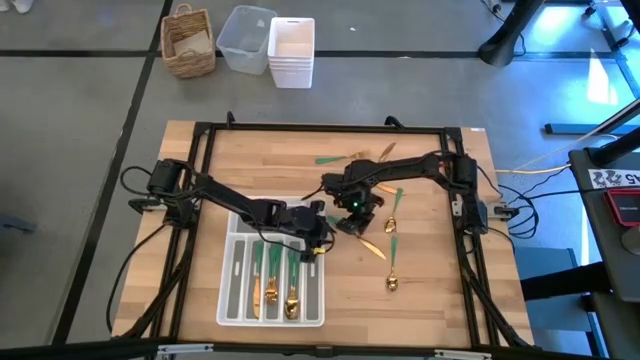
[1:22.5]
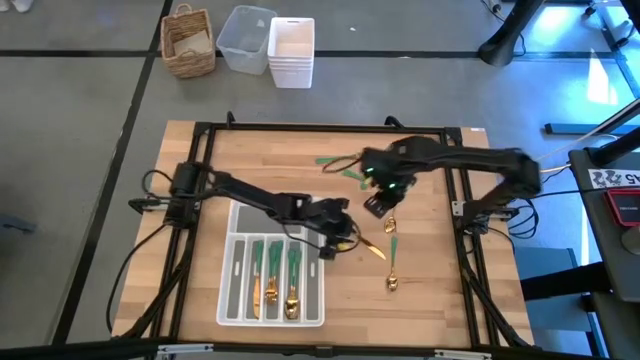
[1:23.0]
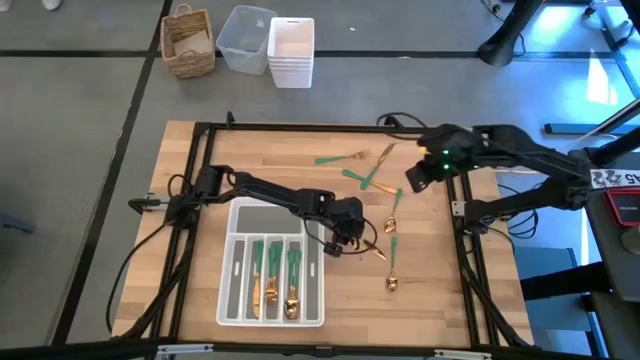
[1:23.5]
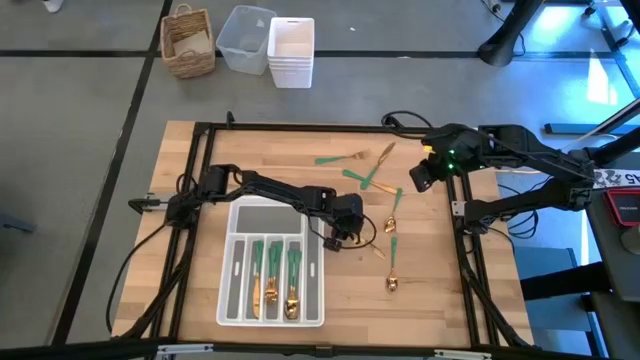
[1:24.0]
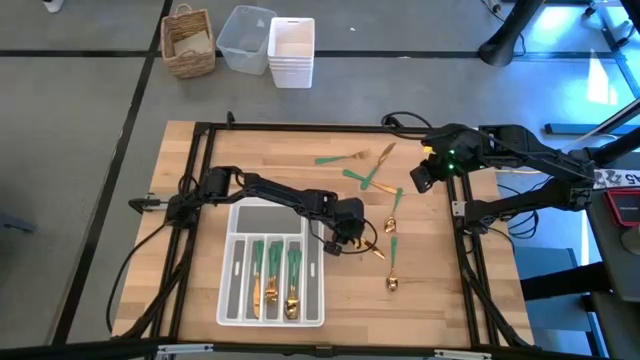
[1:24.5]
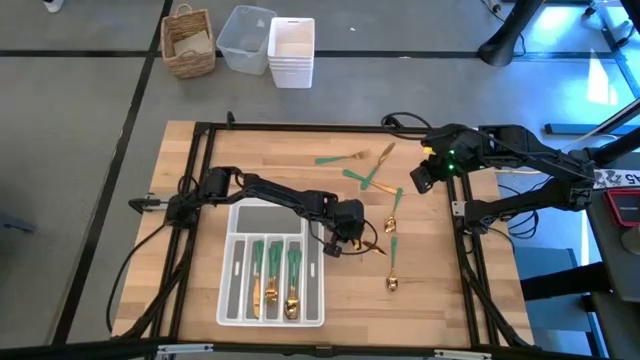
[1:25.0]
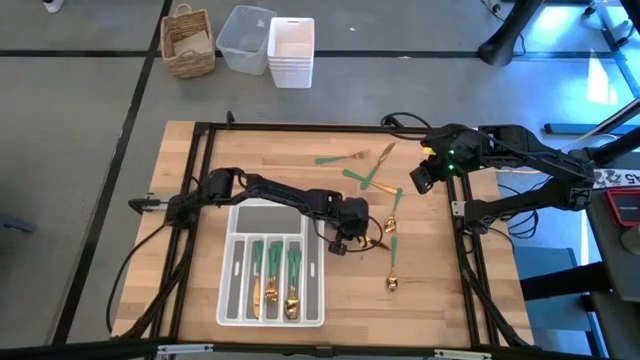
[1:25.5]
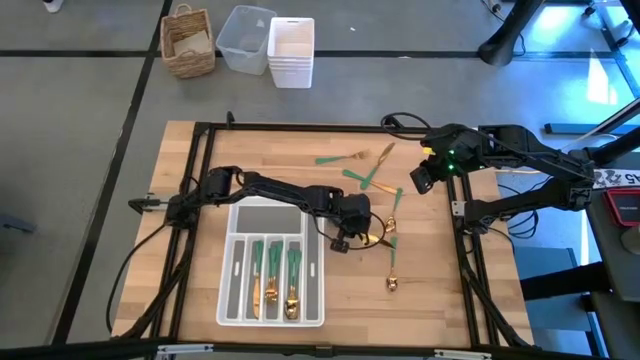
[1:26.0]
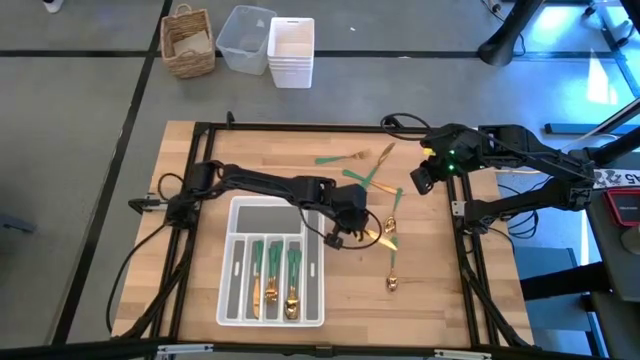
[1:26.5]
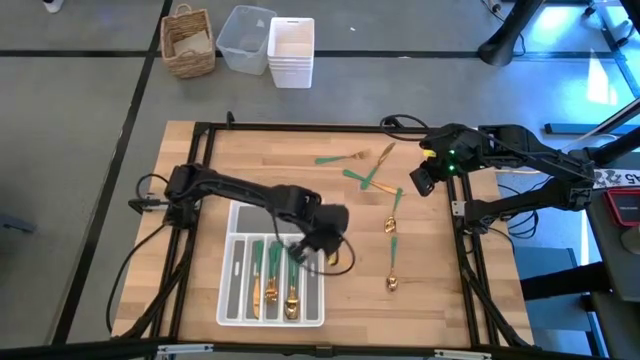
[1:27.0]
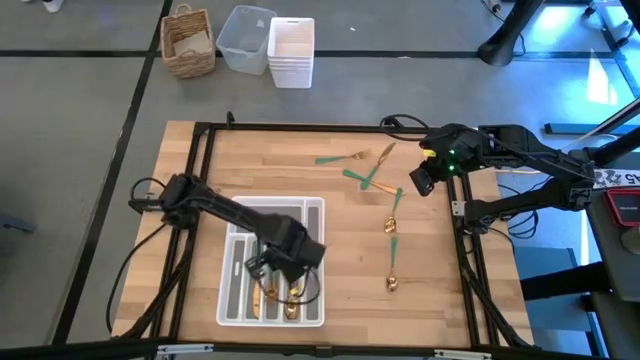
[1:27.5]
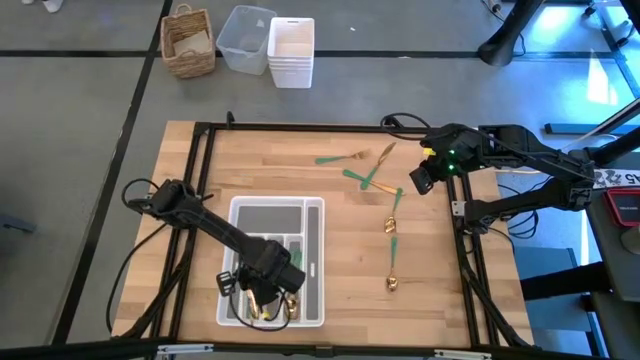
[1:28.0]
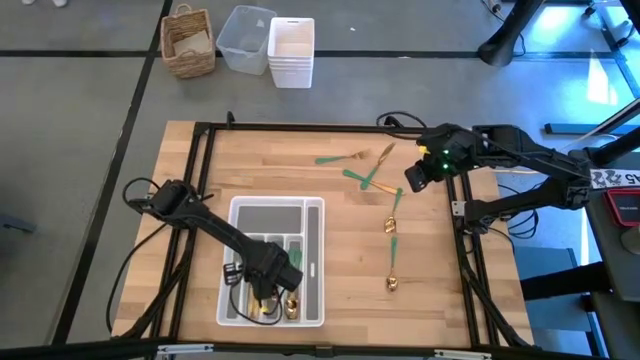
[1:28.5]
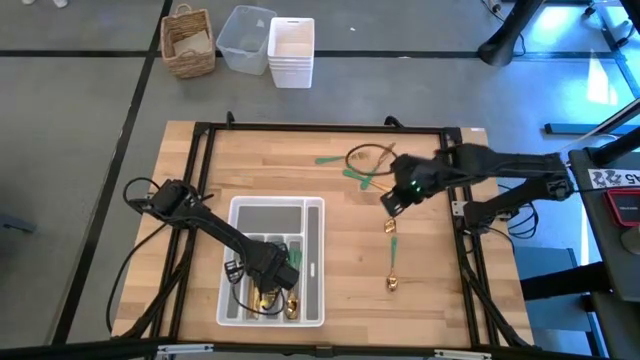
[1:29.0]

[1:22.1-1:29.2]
Task: Sort silverware
Put the table knife in the silverware tray

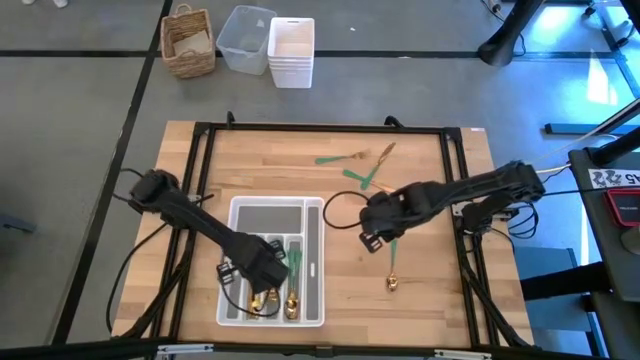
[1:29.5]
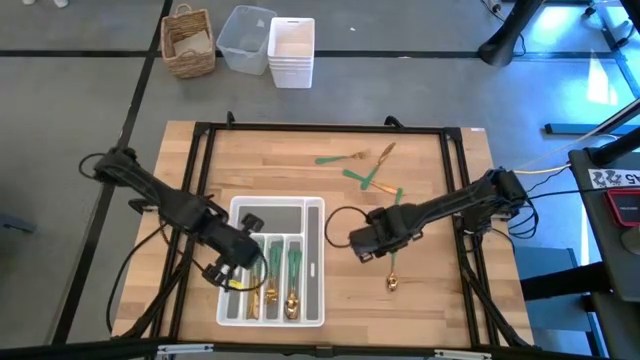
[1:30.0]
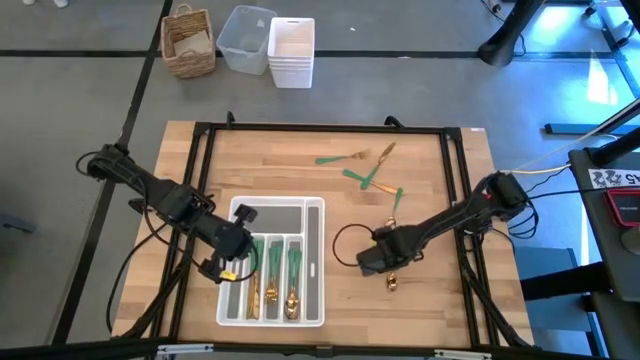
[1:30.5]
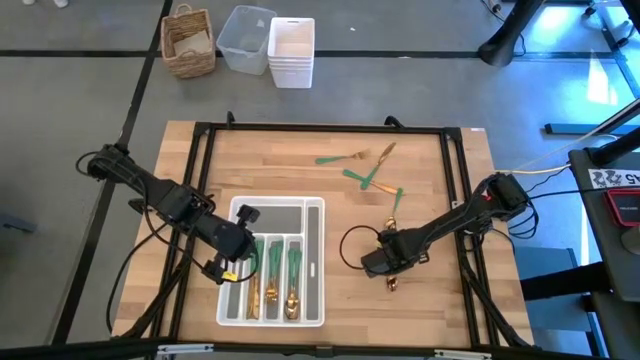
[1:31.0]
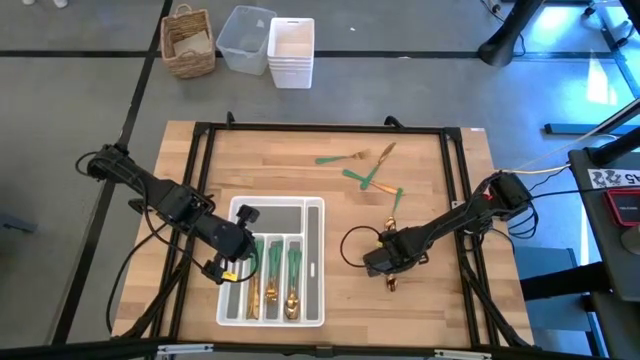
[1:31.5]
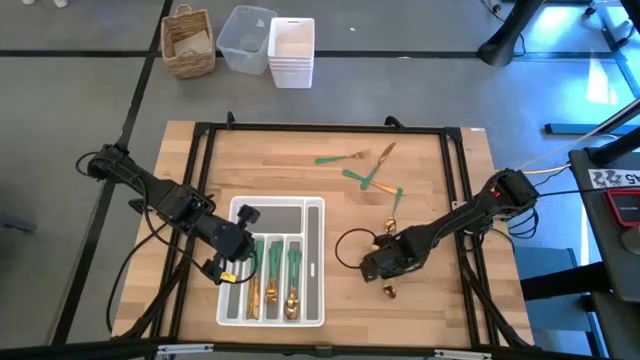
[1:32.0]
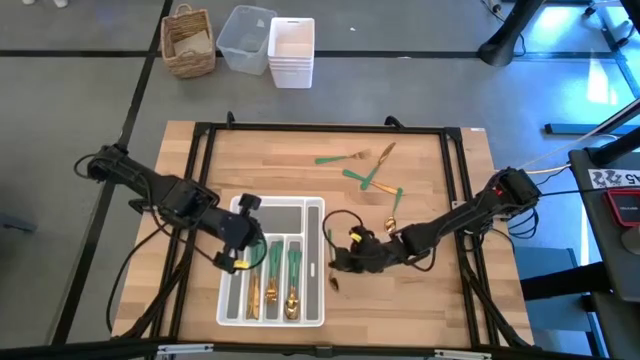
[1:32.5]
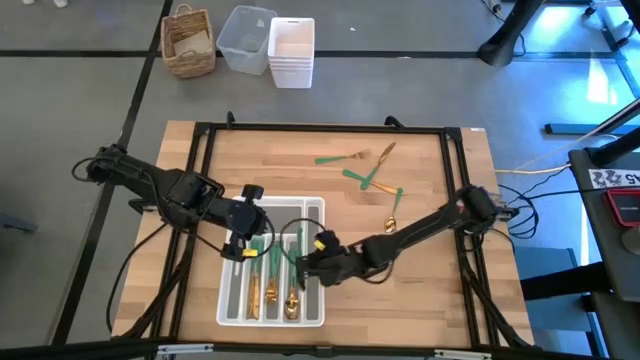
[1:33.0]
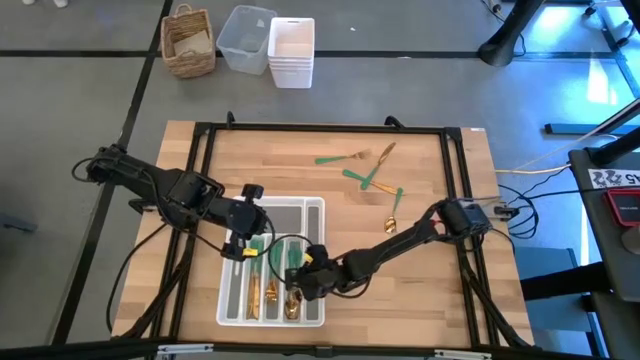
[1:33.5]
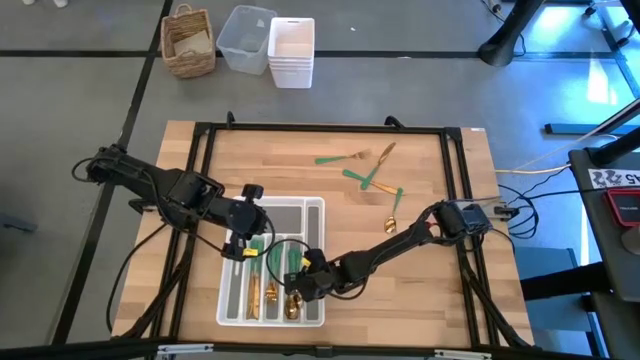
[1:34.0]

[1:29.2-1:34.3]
Put the spoon in the silverware tray

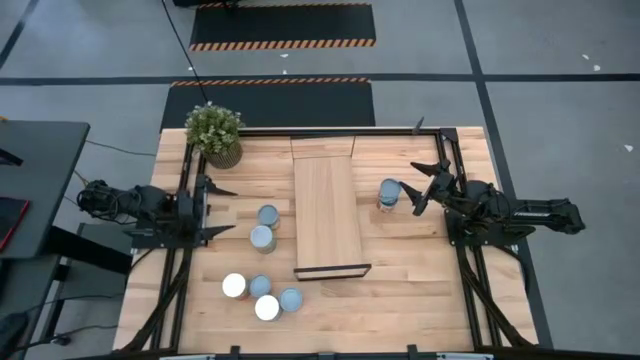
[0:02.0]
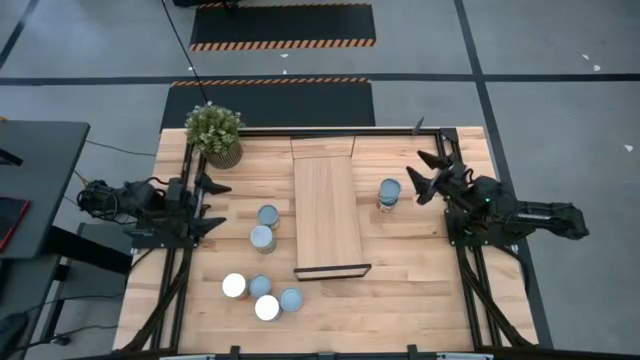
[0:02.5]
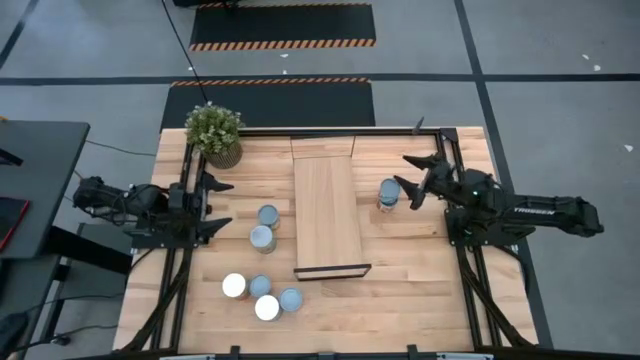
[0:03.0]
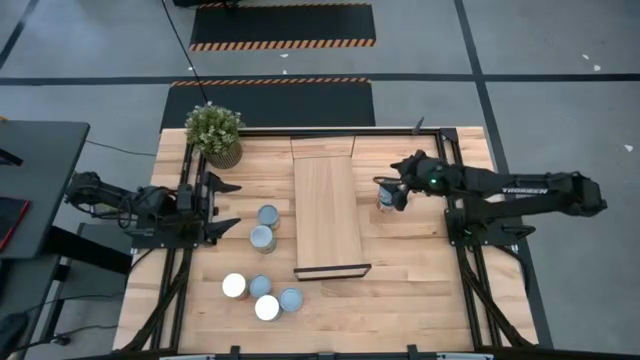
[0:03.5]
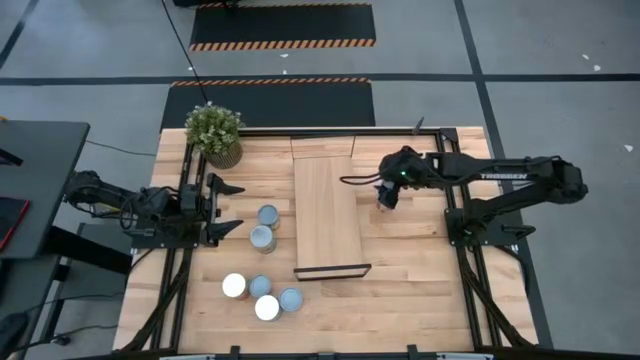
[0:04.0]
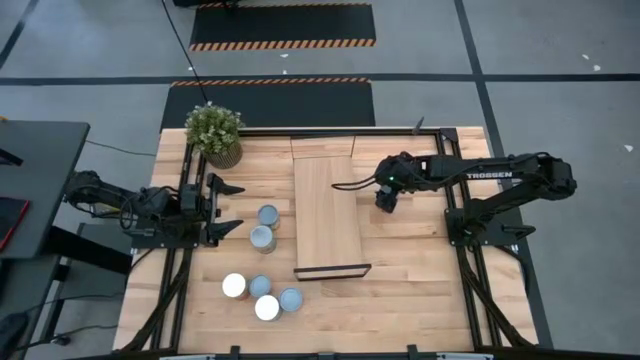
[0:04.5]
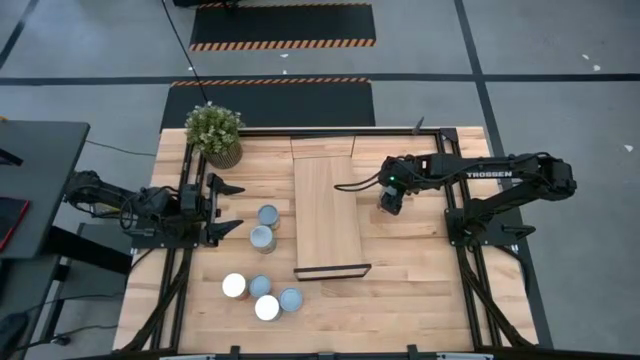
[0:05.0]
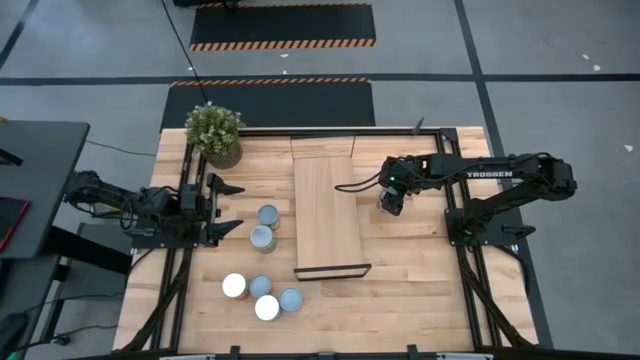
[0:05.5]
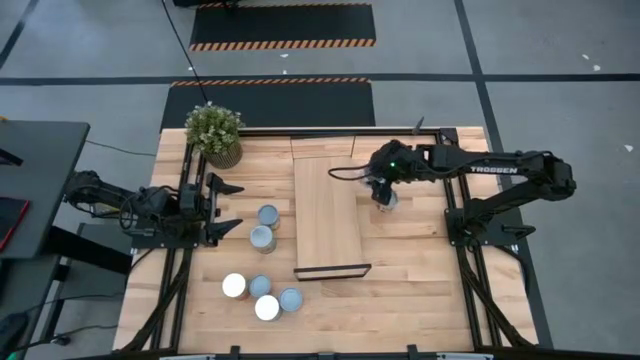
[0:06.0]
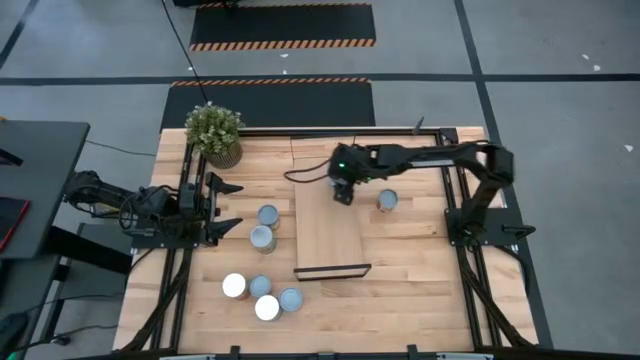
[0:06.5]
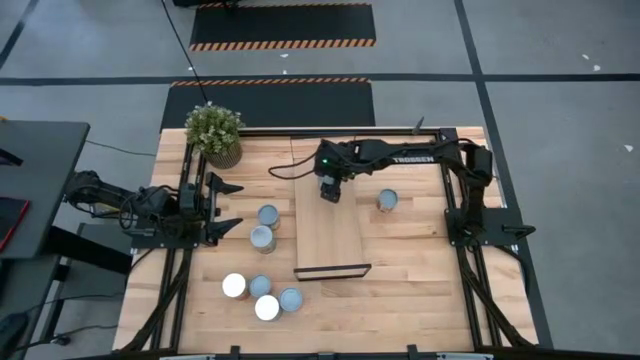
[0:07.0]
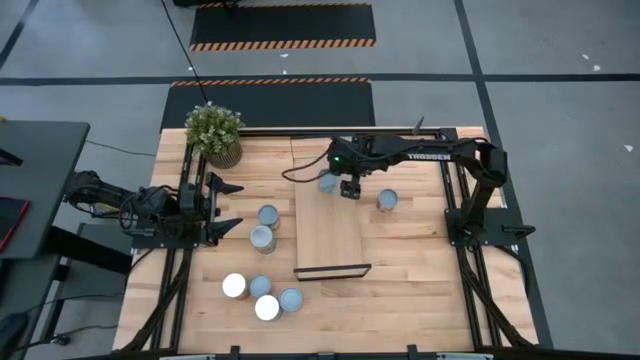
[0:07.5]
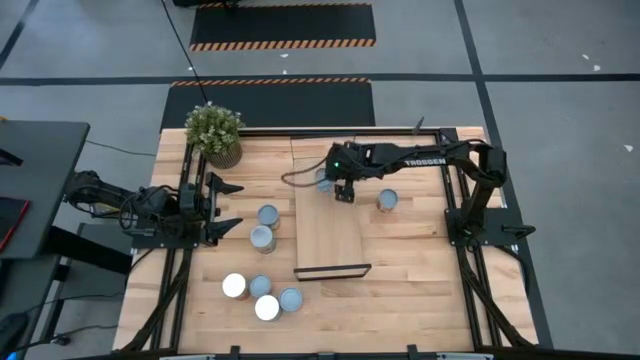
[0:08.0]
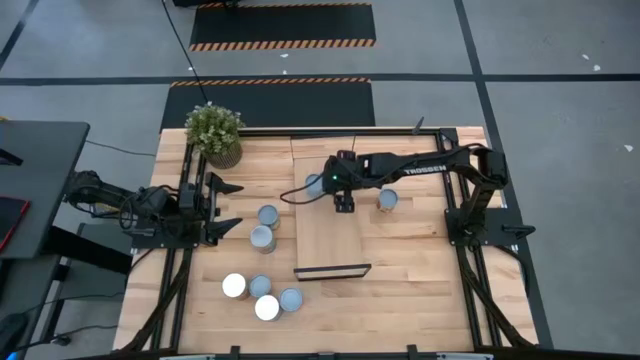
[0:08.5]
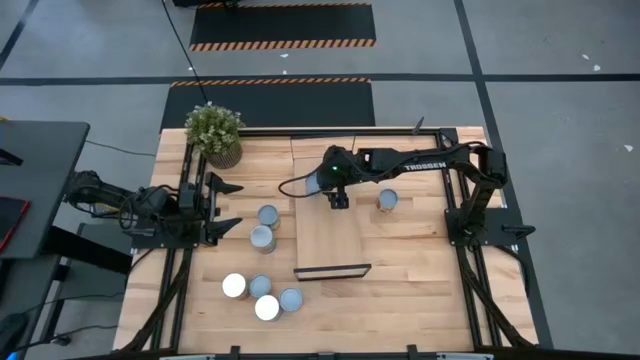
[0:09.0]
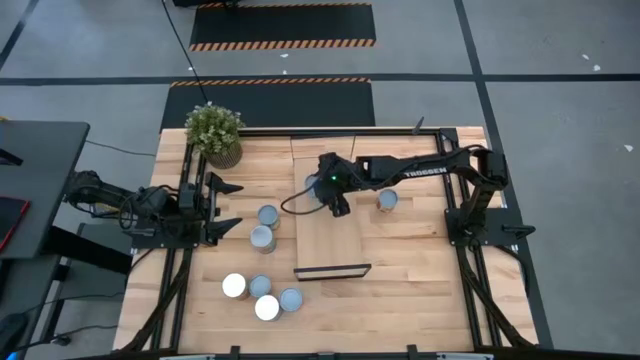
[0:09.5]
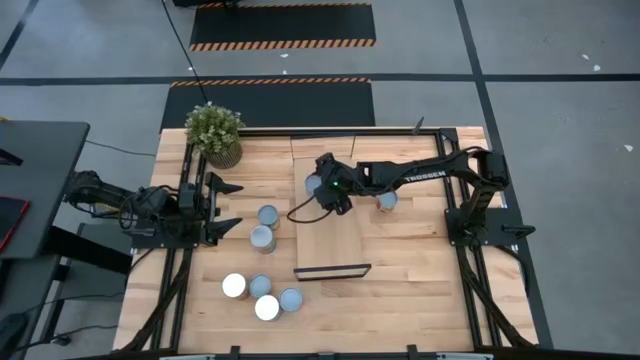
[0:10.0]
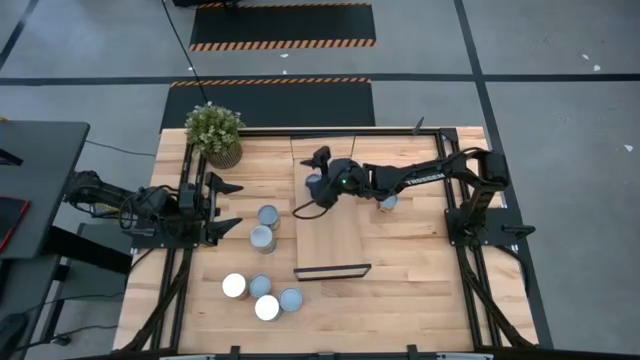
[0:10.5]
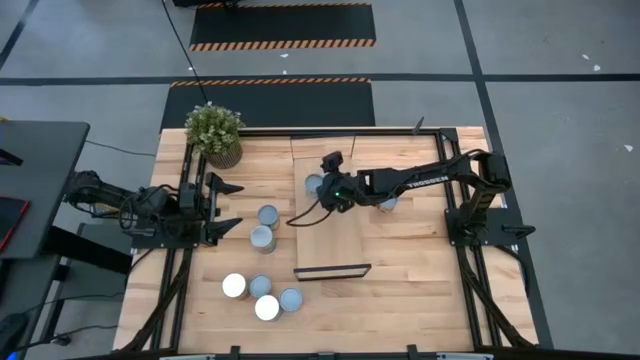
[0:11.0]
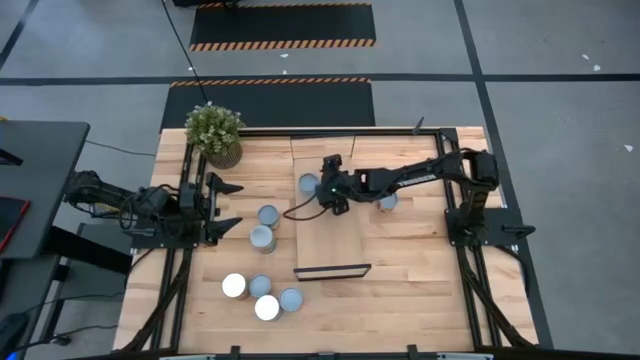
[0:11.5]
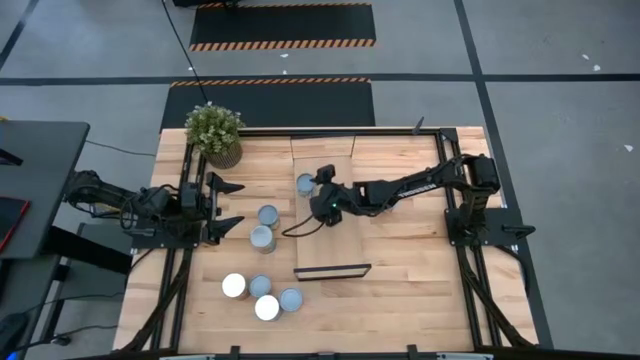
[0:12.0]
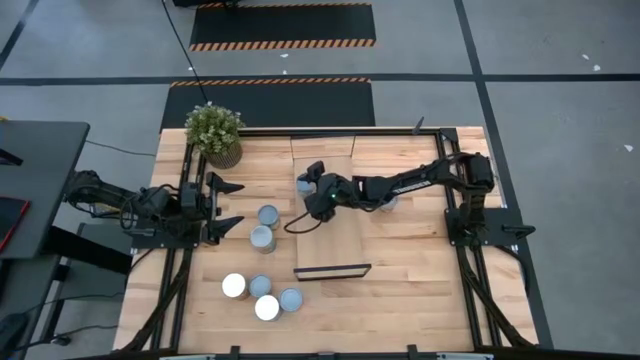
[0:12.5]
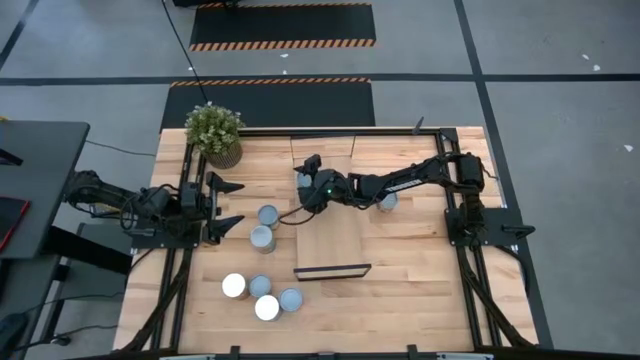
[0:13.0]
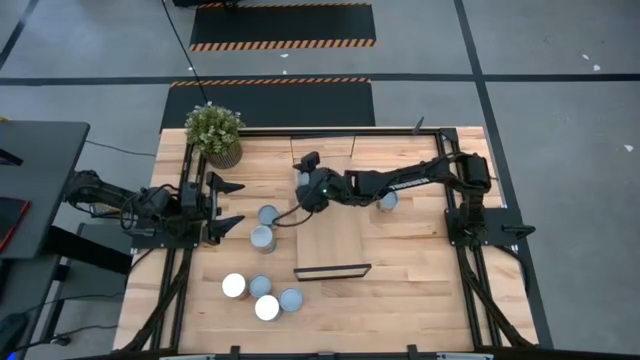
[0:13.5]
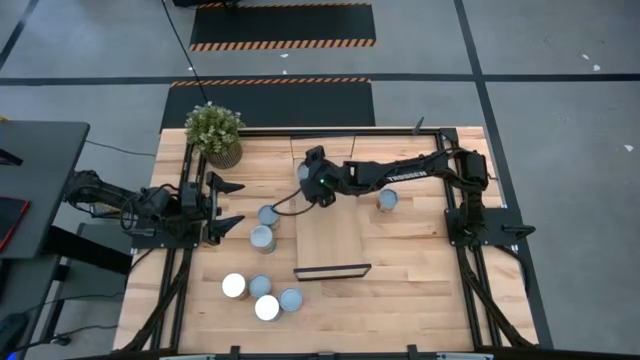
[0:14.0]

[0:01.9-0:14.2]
Task: Pick and place cans onto a shelf
Put the canned carrots on the shelf
